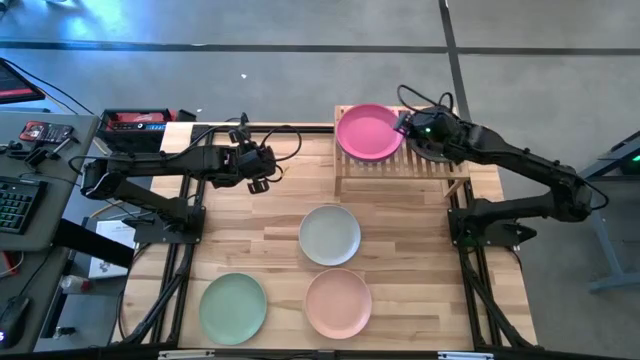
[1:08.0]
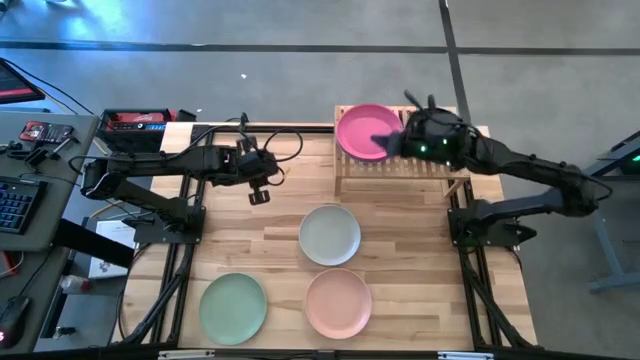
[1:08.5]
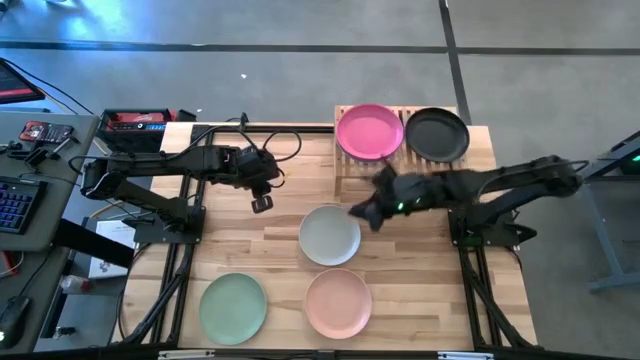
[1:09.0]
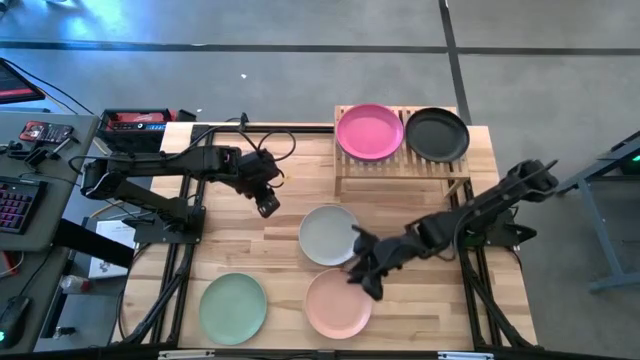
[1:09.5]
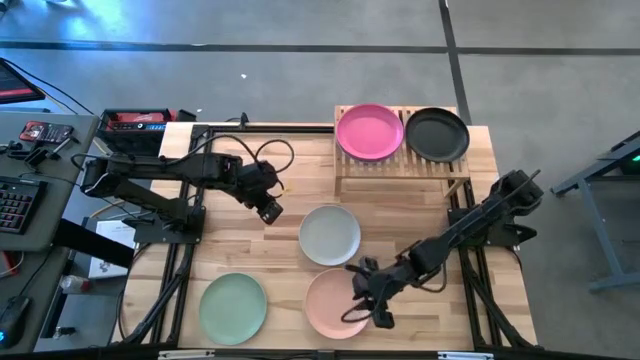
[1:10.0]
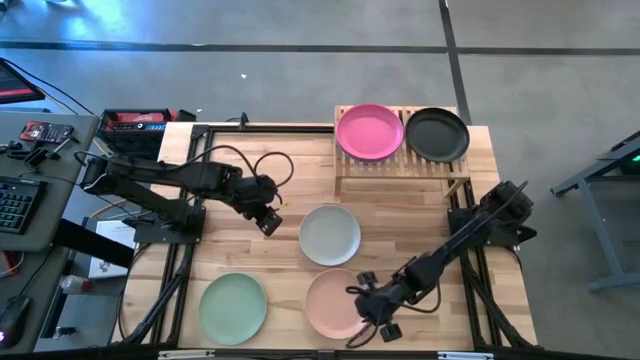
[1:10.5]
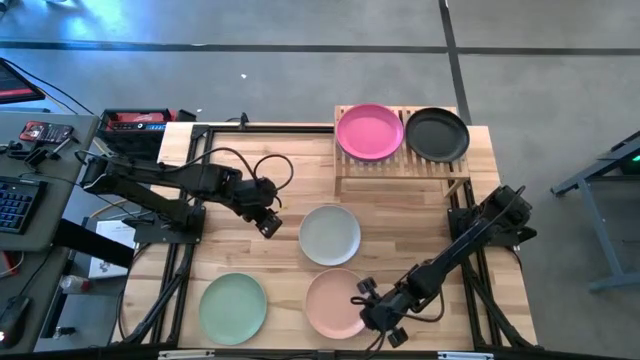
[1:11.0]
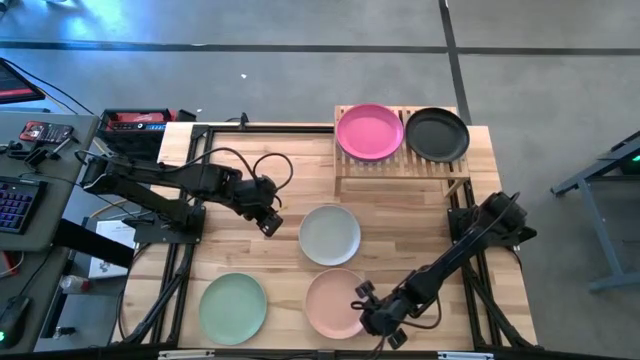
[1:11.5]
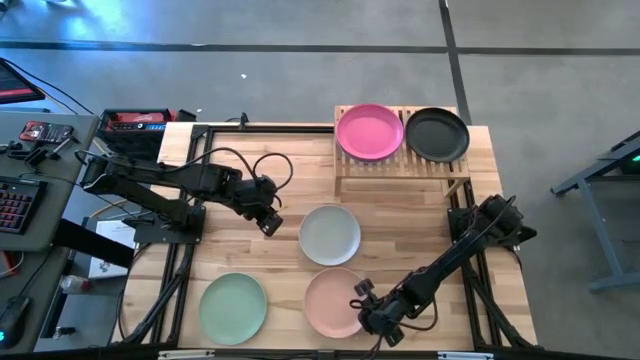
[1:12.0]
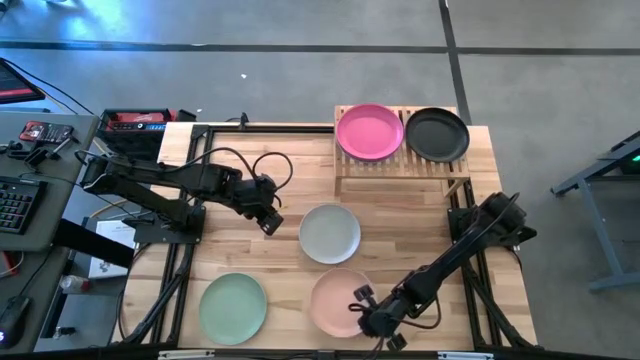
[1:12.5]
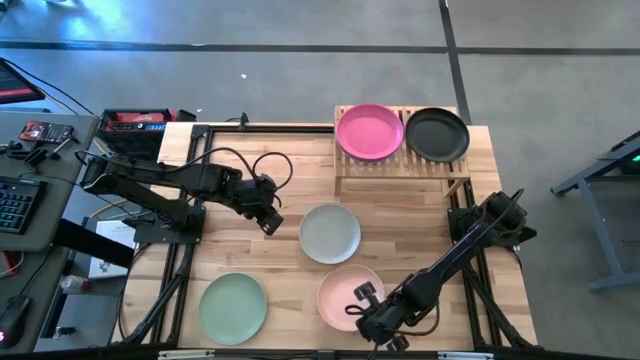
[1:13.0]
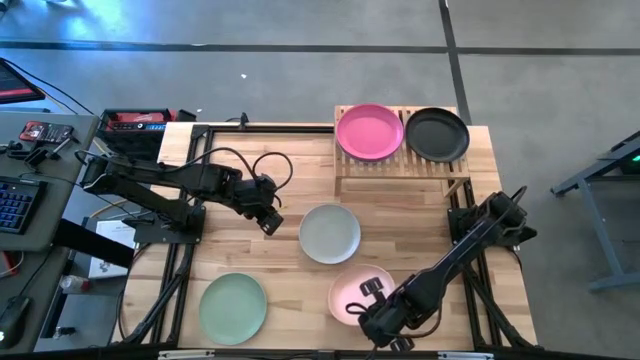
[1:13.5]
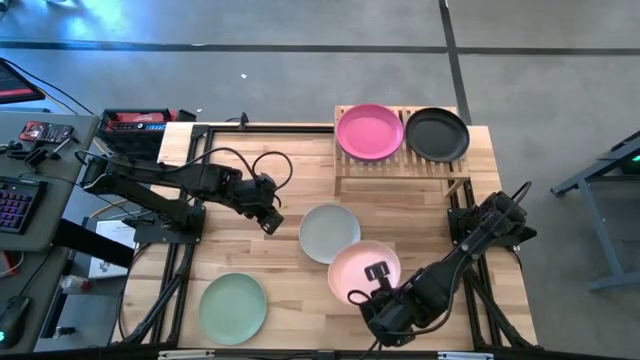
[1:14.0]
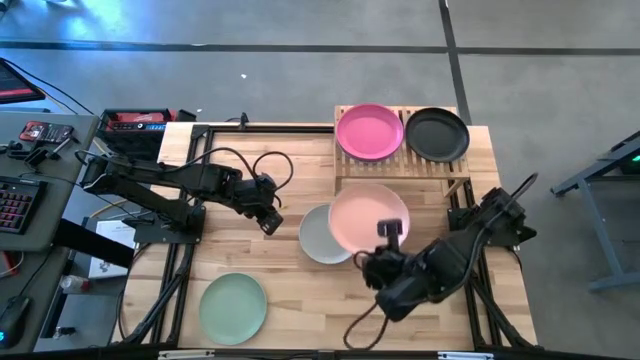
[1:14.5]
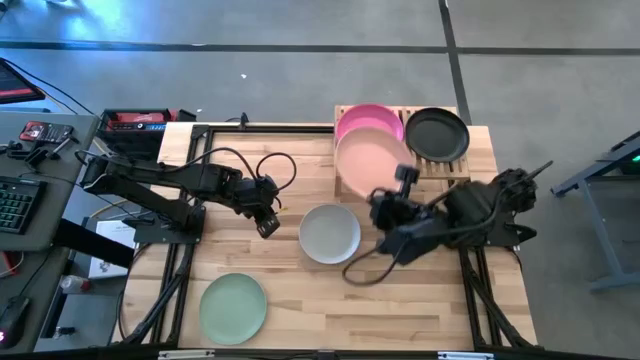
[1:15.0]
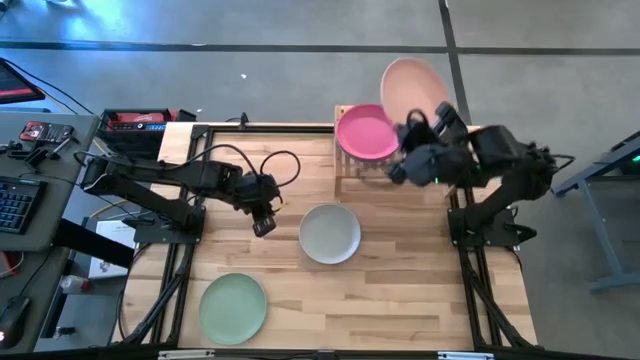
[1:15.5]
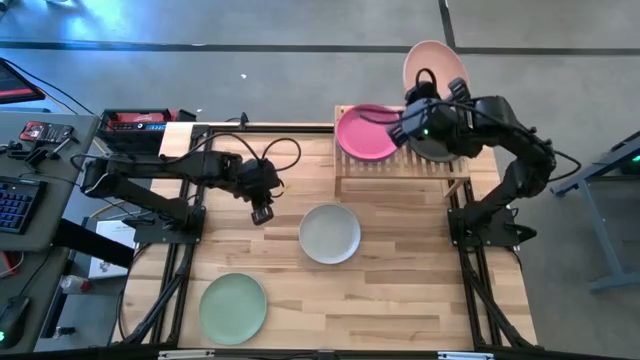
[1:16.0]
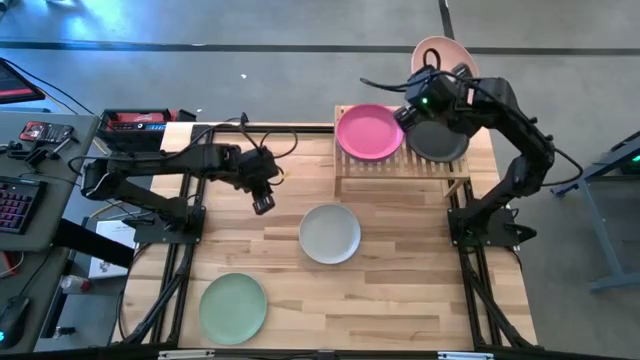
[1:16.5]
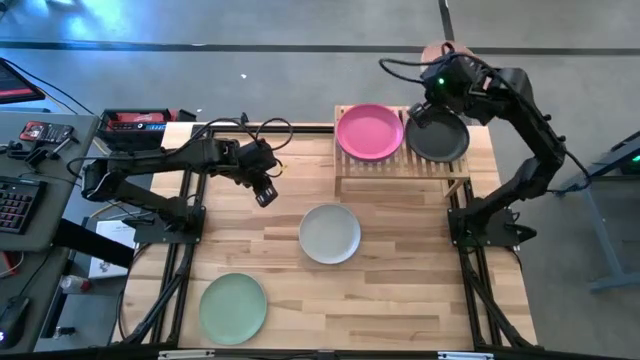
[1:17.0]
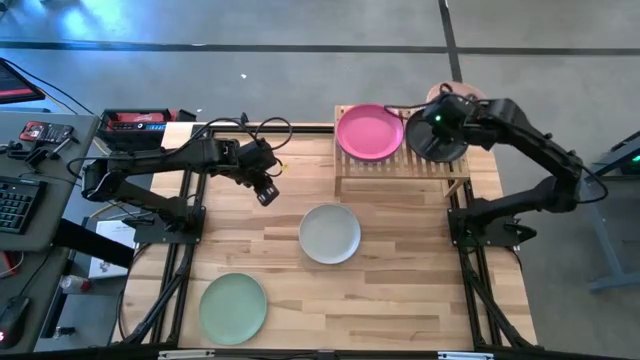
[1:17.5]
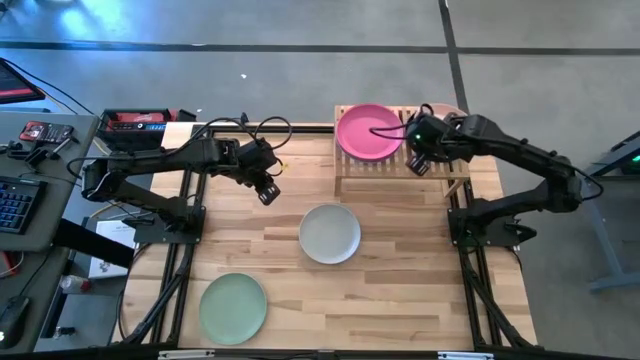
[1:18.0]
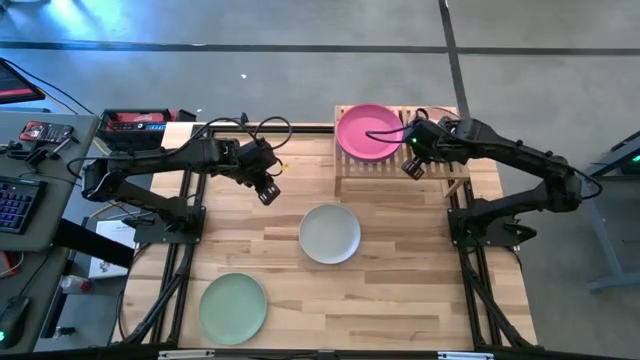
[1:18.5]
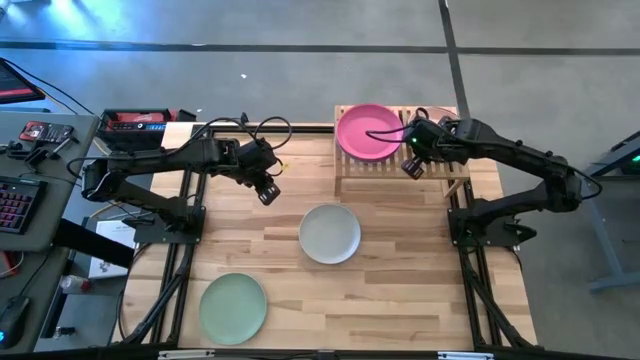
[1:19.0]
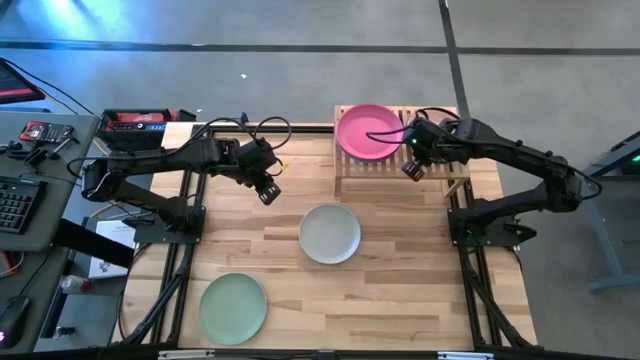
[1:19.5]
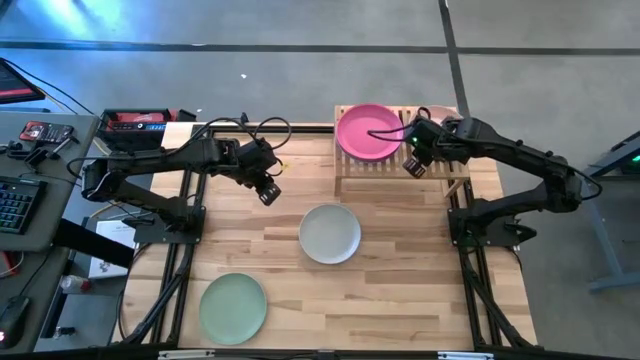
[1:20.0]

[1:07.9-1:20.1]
Task: Place and stack plates onto a shelf
Stack the brown plate on top of the black plate on the shelf

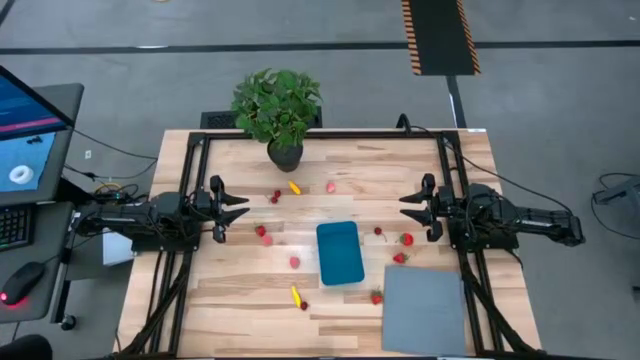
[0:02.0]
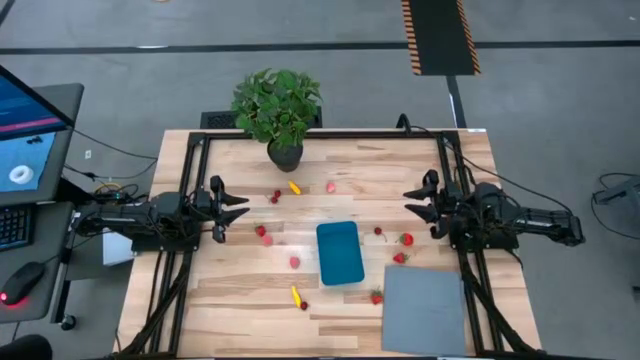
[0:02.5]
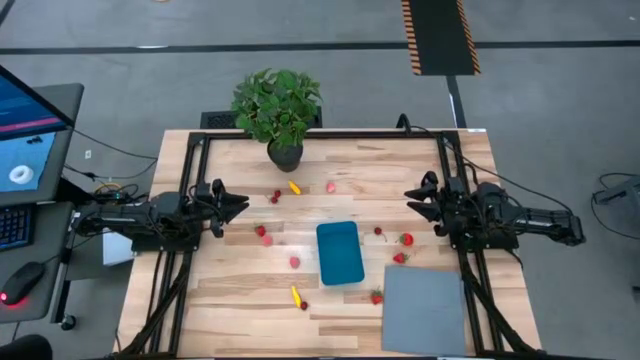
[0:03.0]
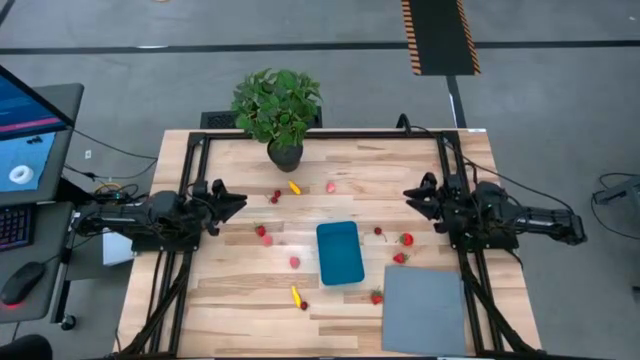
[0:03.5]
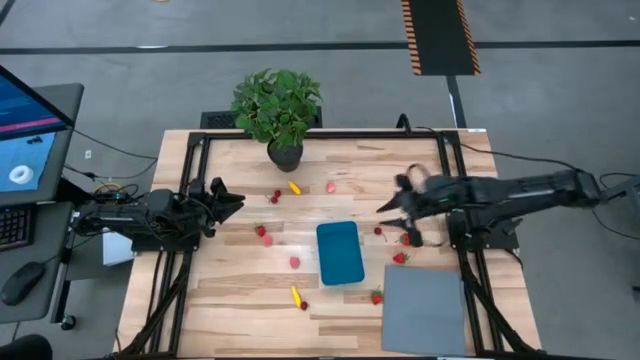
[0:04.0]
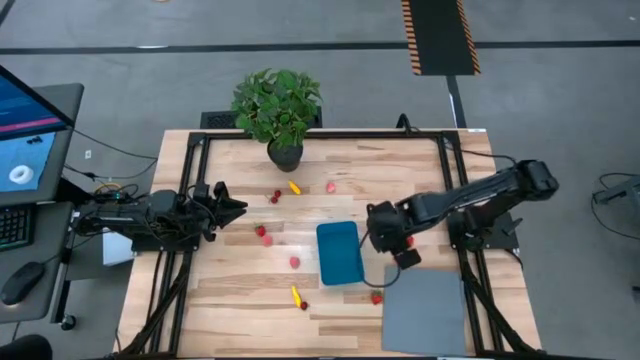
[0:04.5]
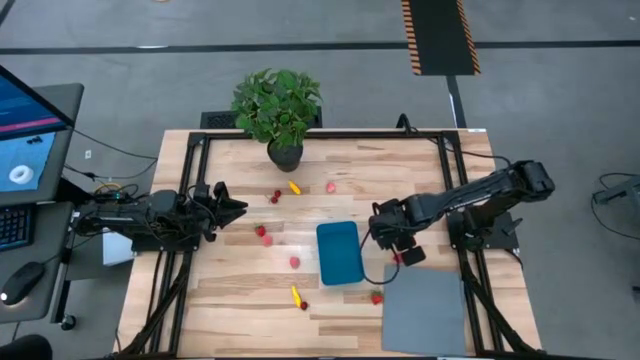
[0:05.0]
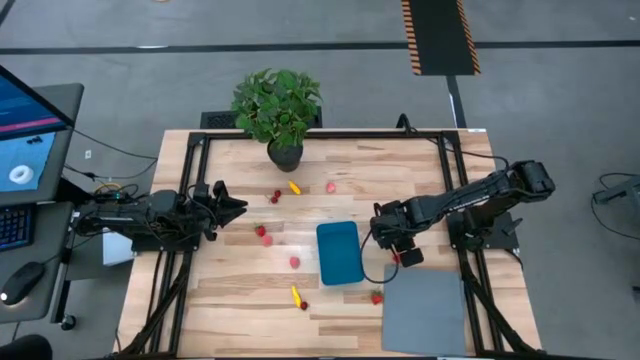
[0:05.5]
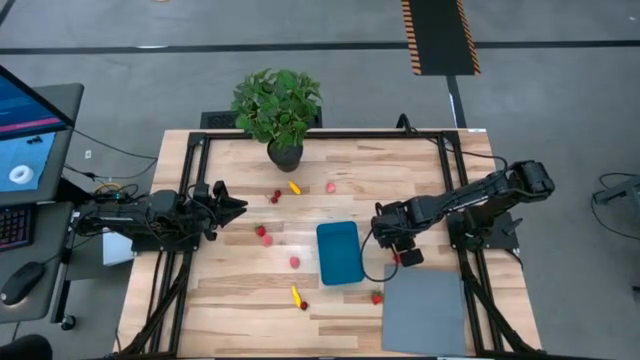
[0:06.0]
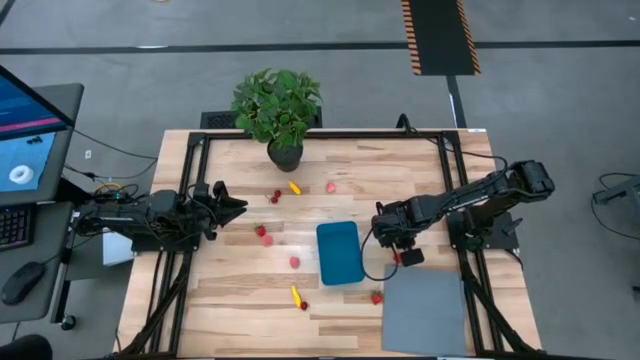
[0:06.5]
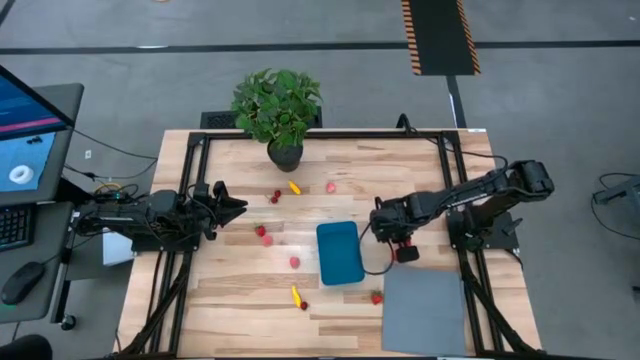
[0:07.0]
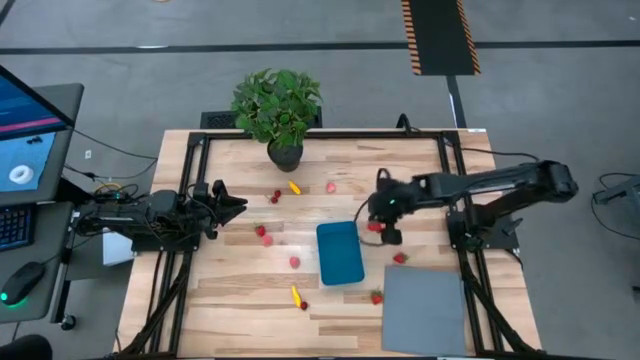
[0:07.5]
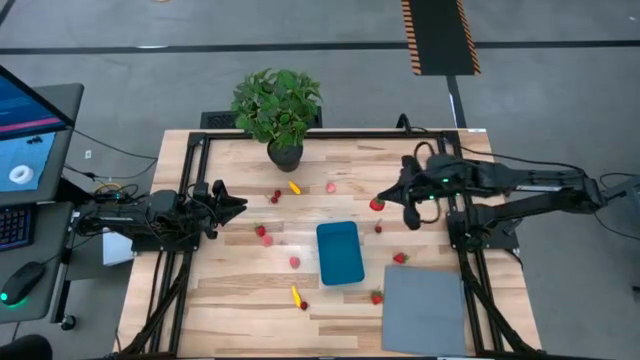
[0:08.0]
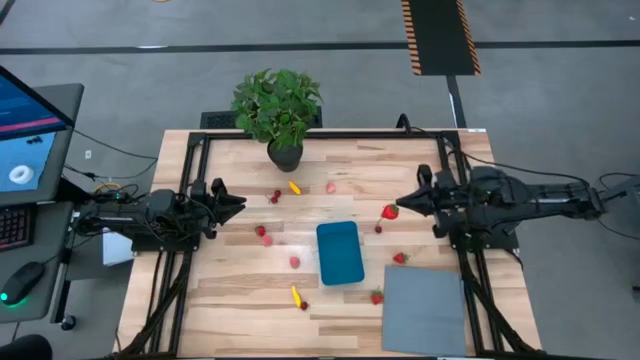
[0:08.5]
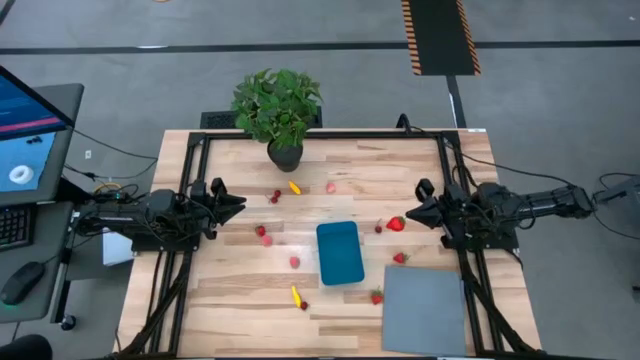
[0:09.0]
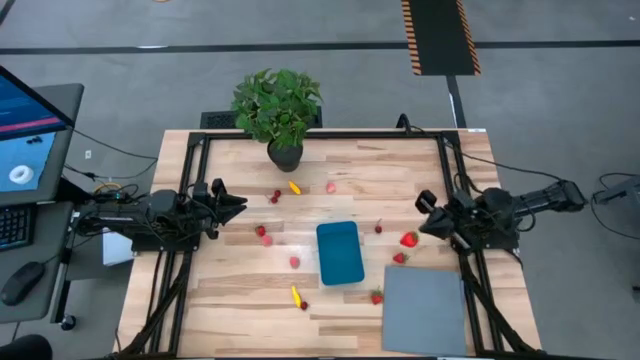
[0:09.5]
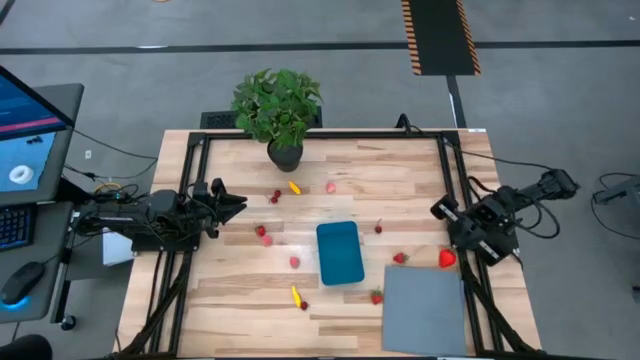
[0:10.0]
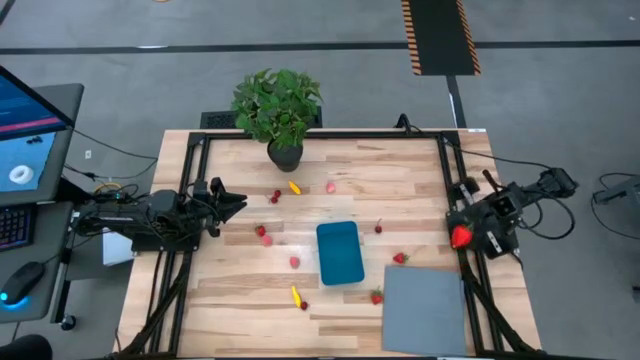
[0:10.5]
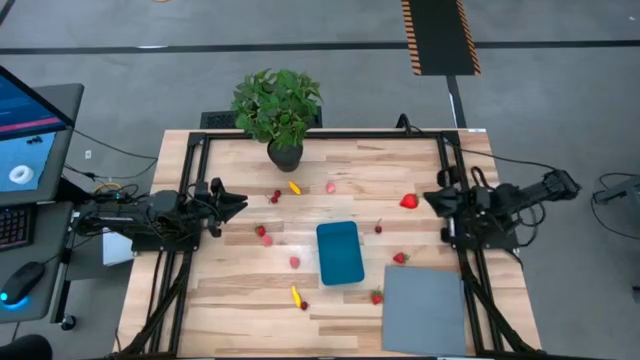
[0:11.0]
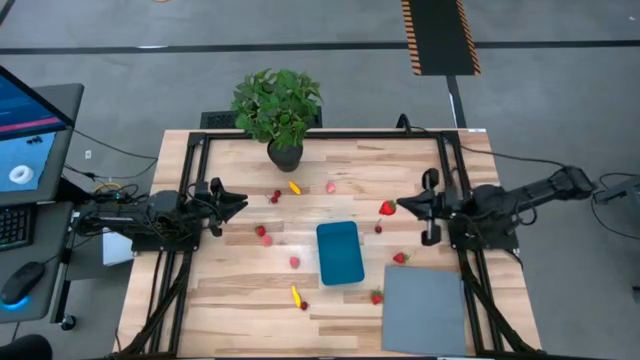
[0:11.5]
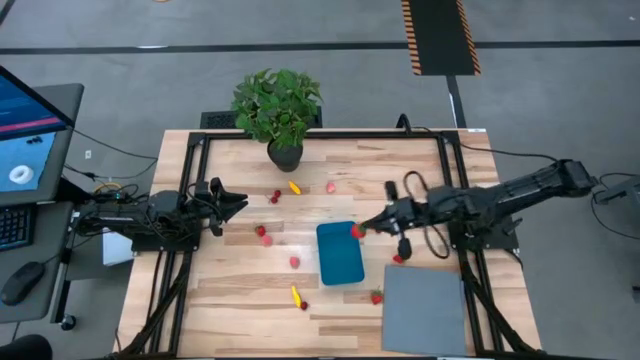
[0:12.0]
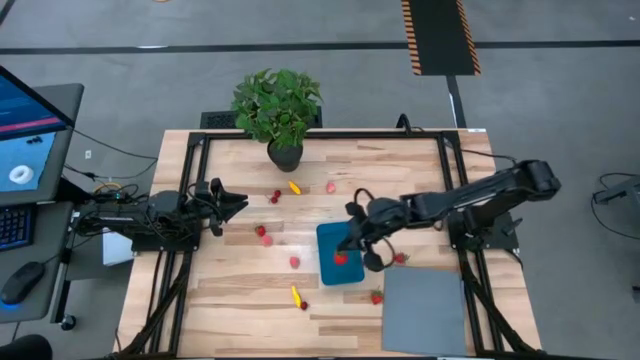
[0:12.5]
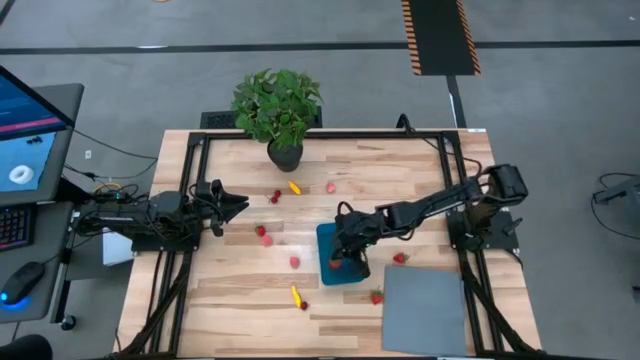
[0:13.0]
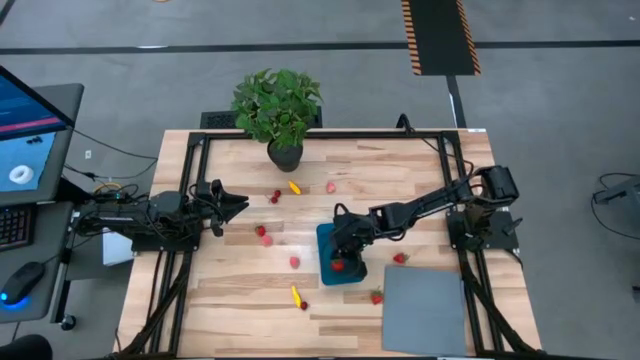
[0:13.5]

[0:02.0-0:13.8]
Task: Pick and placing Produce into tupperware
Put the strawberry into the blue bin
